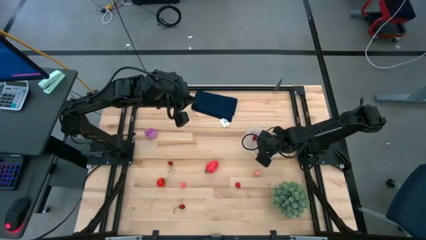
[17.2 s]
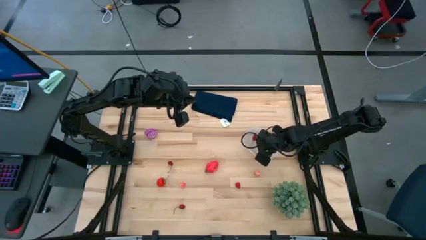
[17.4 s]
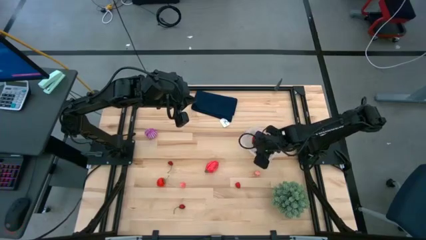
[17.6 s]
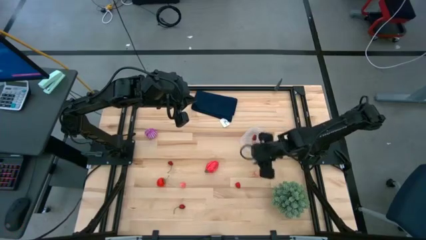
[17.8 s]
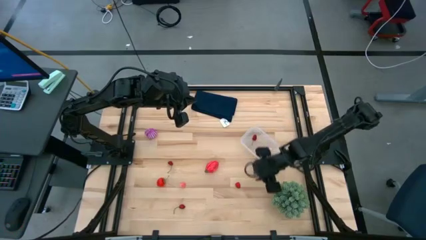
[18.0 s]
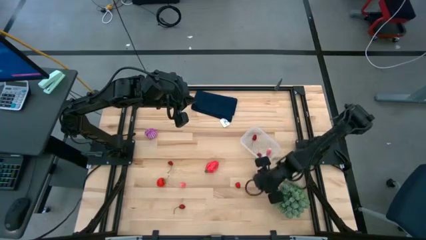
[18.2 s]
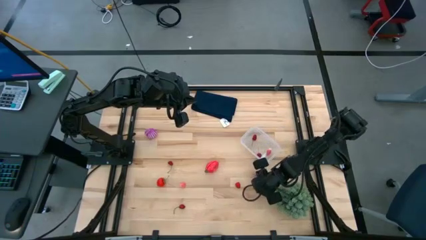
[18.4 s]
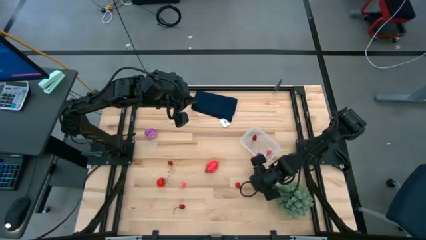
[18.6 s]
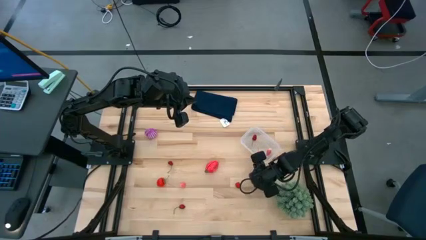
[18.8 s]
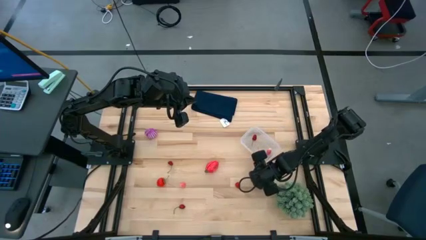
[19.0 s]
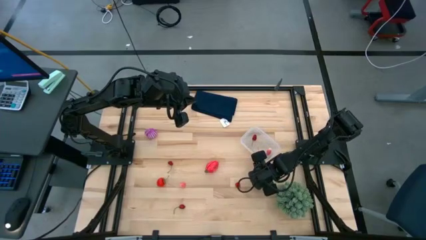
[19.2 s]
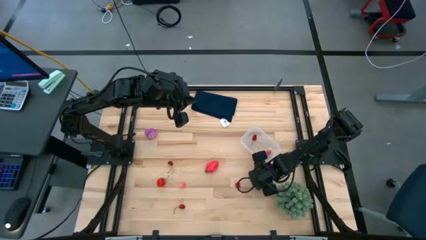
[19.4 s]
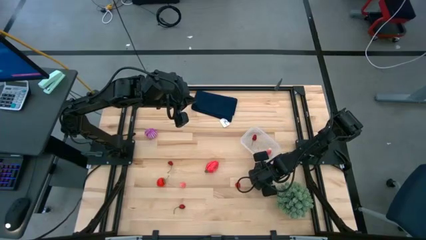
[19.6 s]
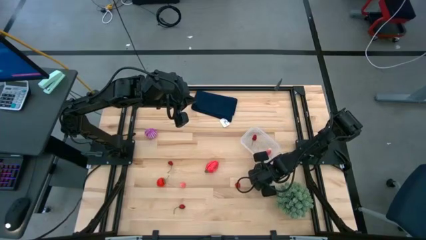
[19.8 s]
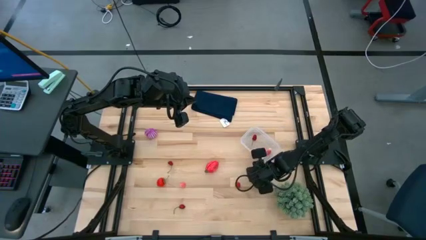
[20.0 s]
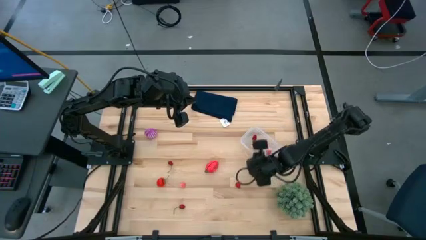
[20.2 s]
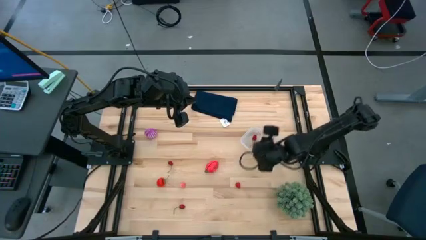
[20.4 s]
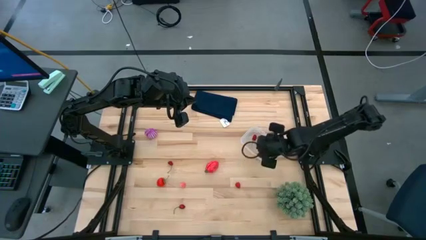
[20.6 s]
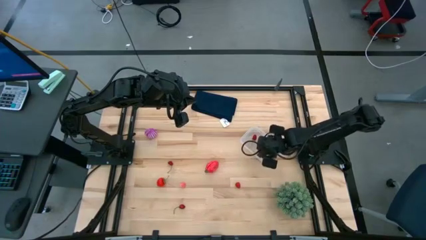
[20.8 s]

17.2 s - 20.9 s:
Task: Pick and placing Produce into tupperware
Put the peach into the transparent bin

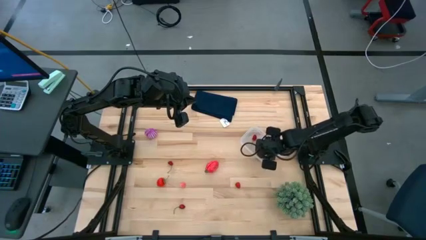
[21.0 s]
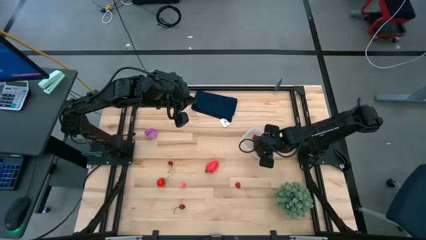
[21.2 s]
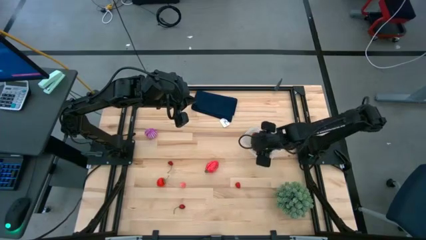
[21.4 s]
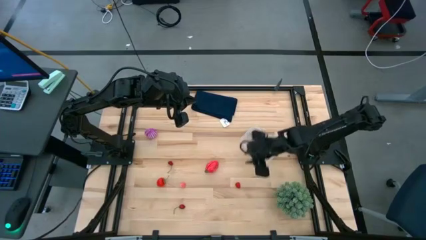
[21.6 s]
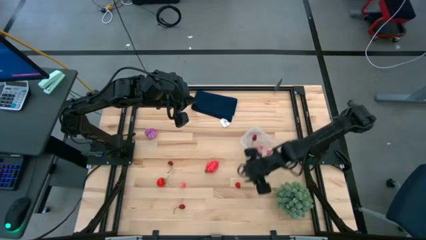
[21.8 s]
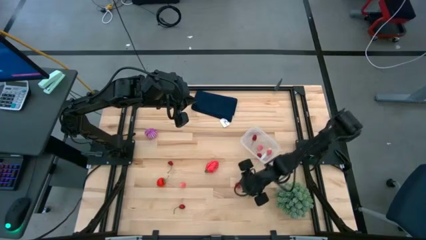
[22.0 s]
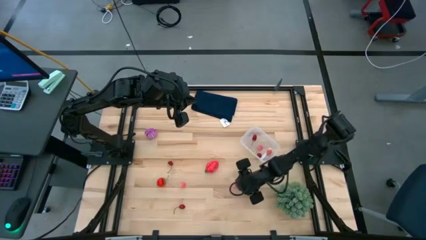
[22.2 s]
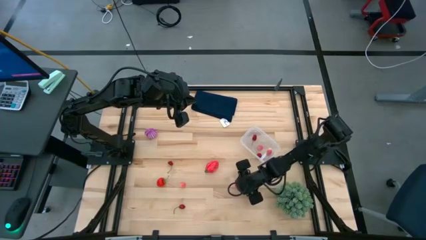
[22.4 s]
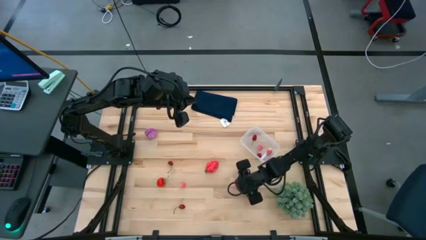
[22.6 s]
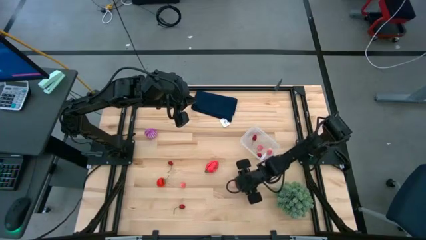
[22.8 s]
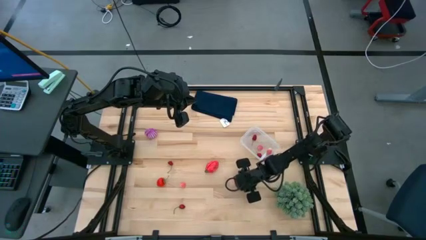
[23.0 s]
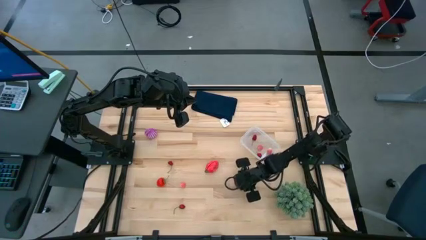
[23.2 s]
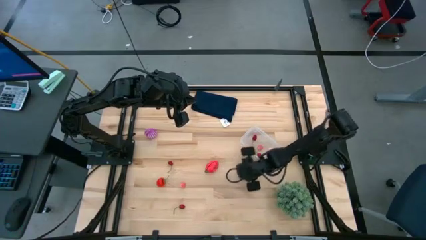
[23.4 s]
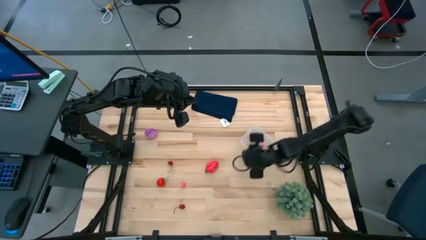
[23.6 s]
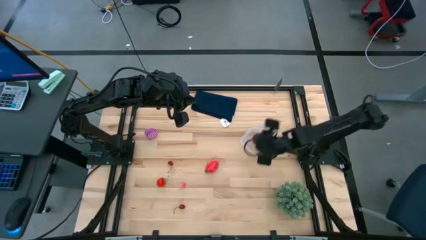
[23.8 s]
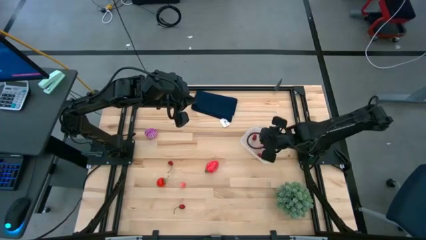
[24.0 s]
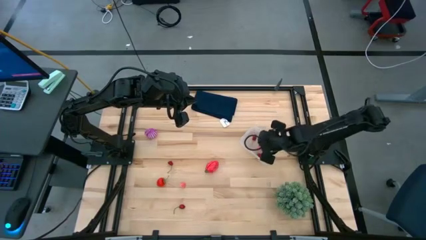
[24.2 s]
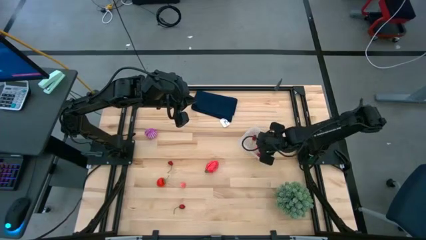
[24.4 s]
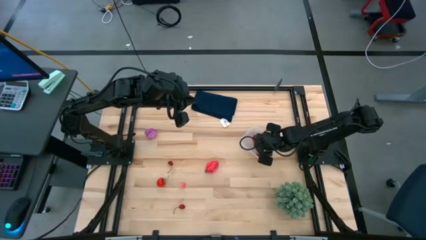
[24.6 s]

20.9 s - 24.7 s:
Put the raspberry into the transparent bin

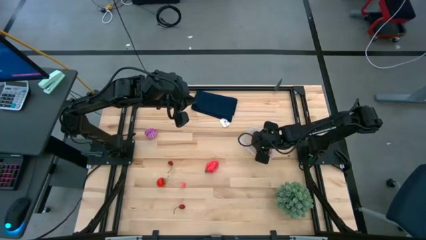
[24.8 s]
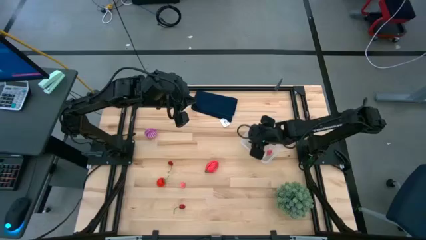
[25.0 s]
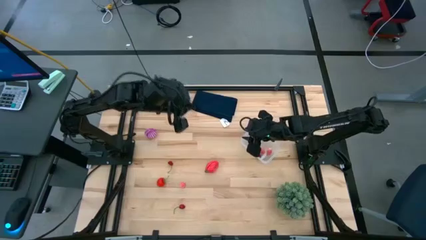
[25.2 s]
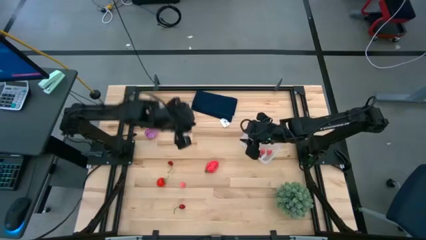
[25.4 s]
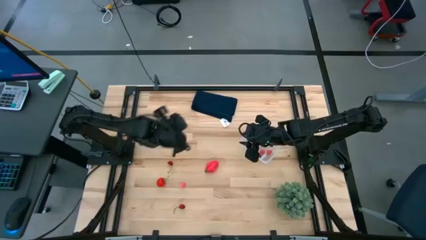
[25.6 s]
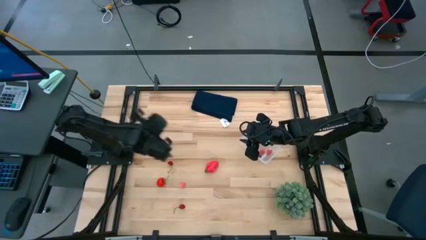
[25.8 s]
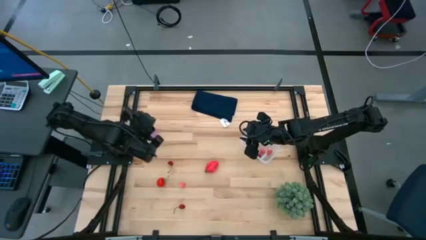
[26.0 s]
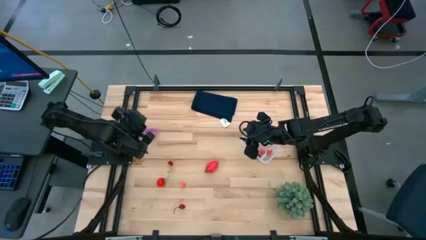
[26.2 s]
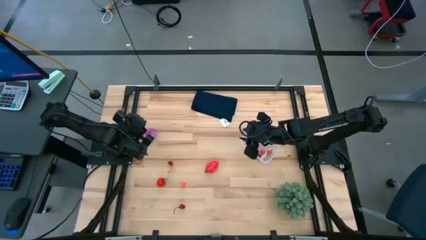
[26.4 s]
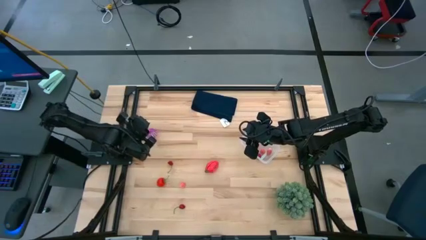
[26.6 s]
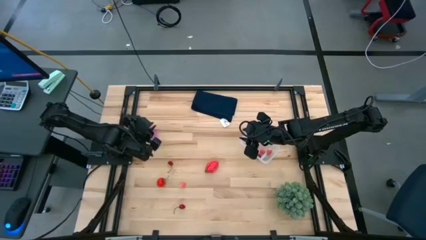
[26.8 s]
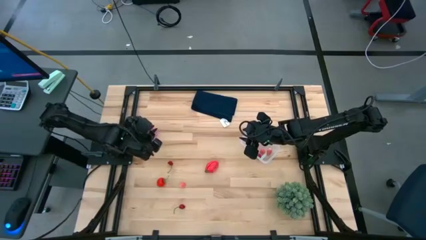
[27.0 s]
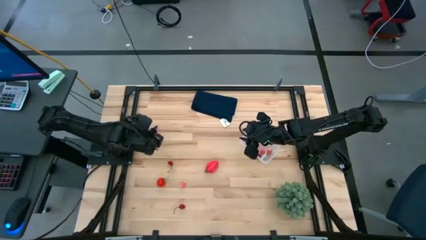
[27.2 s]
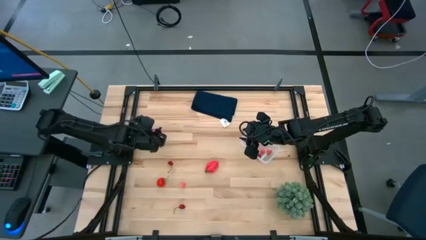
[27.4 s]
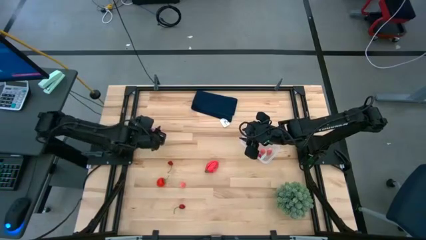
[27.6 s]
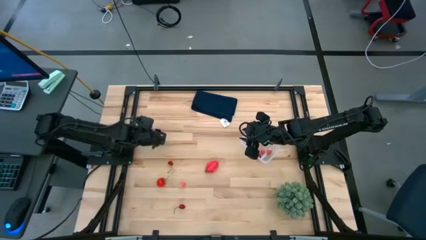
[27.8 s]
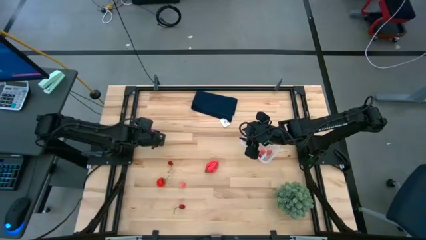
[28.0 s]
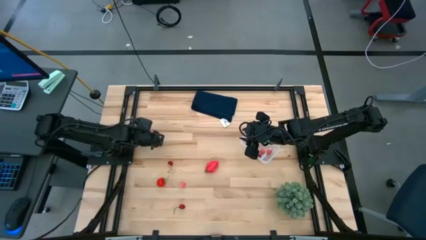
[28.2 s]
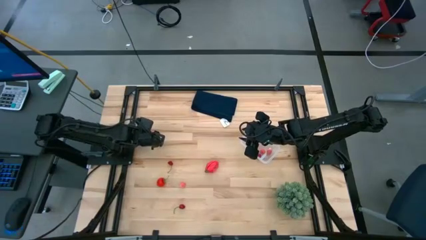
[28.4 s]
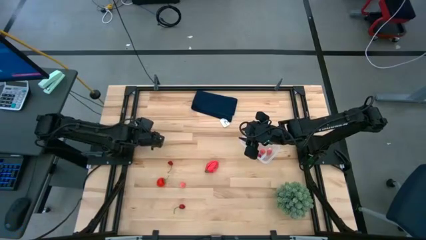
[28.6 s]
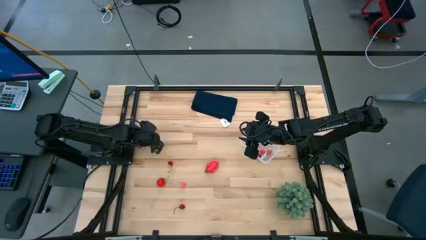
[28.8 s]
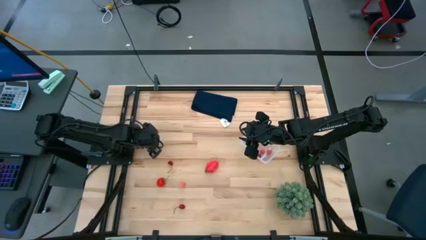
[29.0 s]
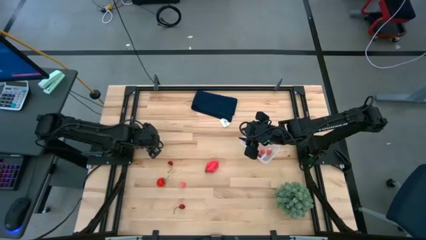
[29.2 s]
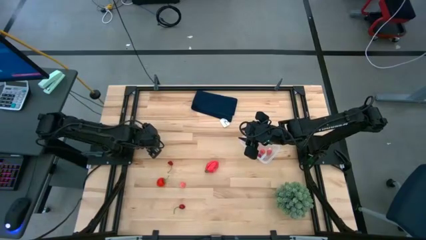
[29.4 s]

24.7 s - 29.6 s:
Put the onion into the transparent bin

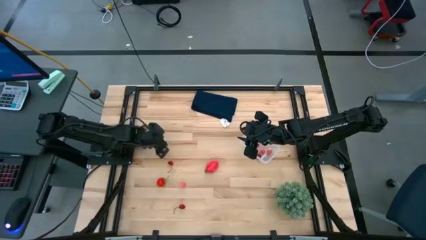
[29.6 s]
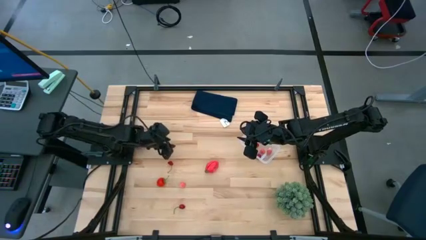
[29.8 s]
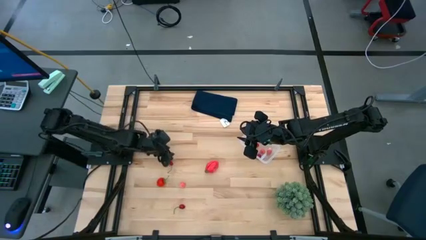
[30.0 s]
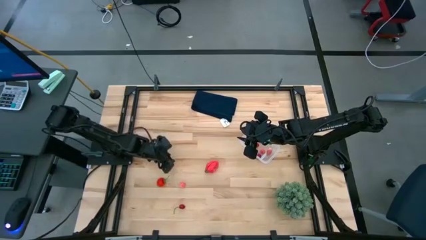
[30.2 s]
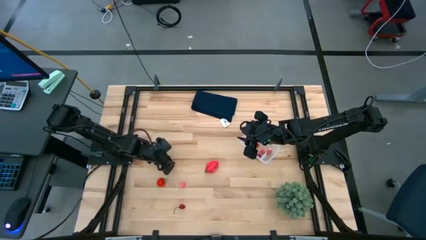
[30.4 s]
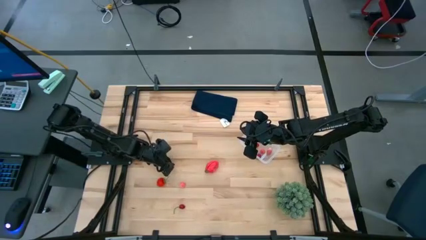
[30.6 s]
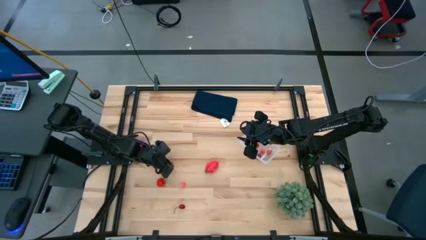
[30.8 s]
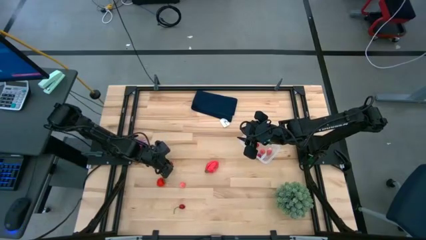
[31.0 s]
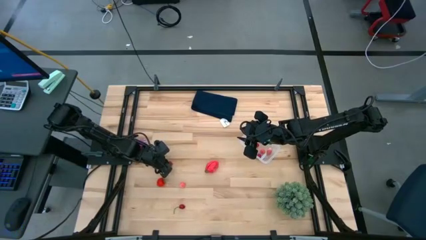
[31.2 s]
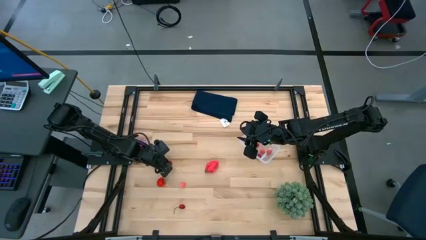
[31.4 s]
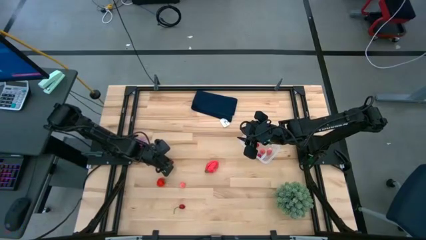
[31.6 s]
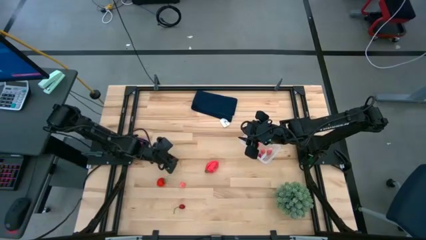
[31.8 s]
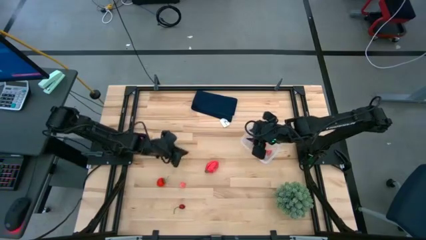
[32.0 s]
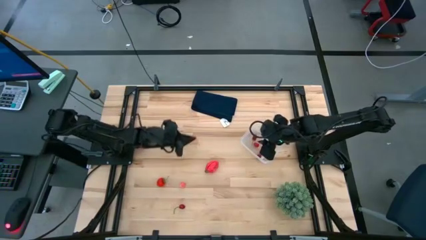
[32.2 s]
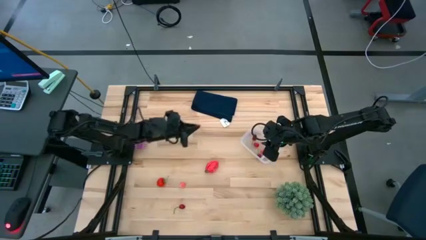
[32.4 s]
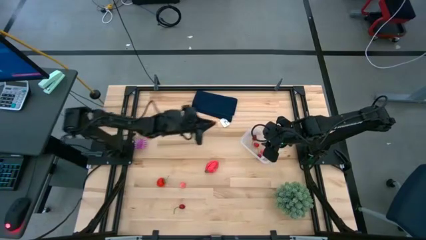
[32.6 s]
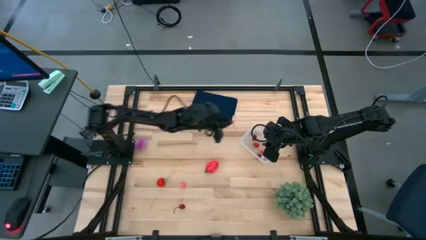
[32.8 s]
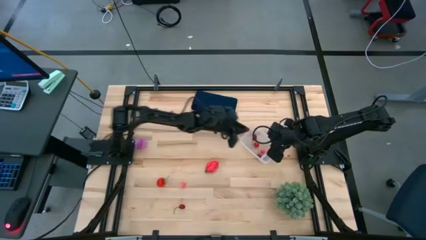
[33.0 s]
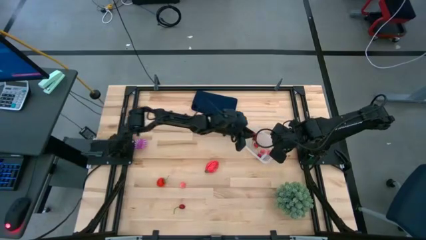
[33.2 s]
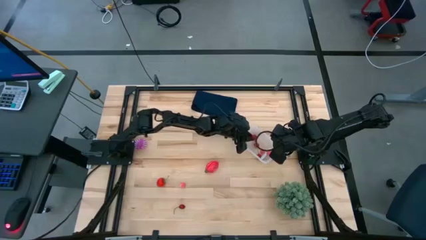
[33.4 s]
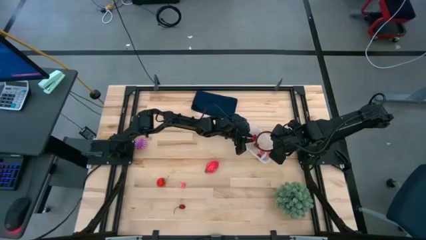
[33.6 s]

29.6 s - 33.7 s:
Put the cherry into the transparent bin

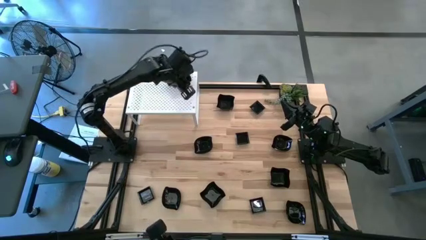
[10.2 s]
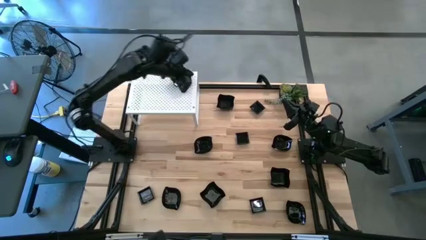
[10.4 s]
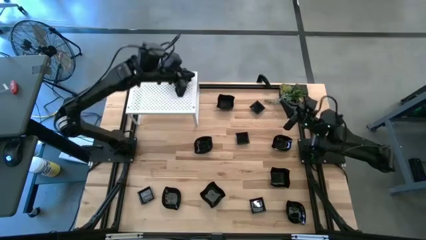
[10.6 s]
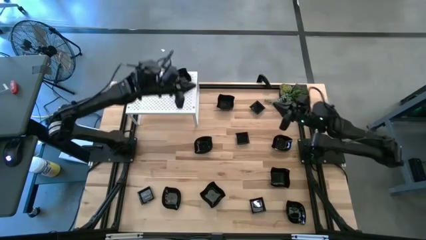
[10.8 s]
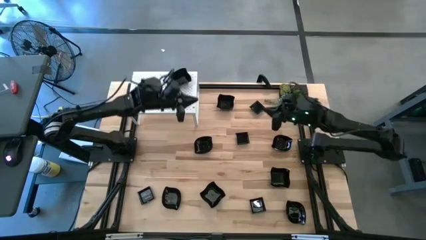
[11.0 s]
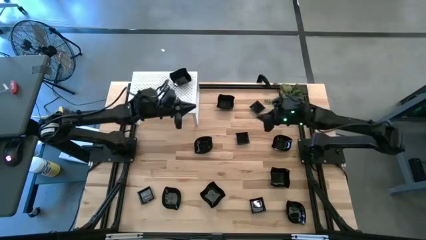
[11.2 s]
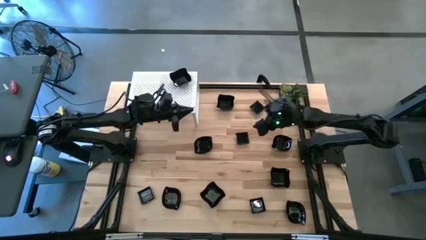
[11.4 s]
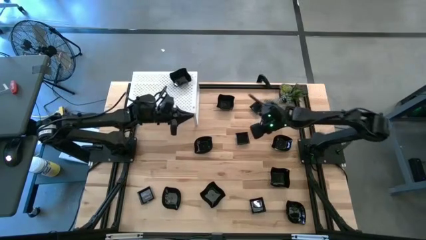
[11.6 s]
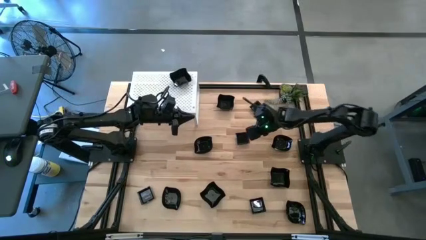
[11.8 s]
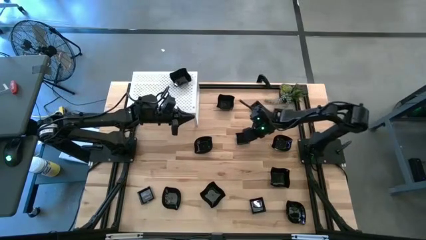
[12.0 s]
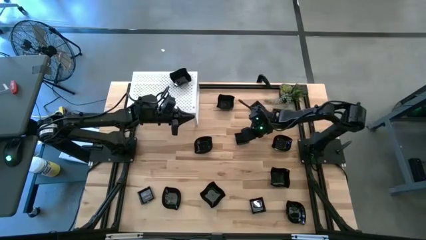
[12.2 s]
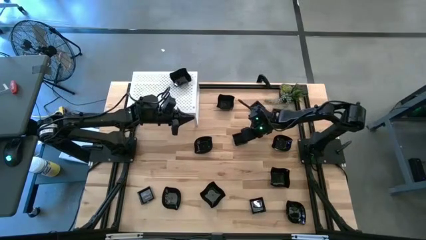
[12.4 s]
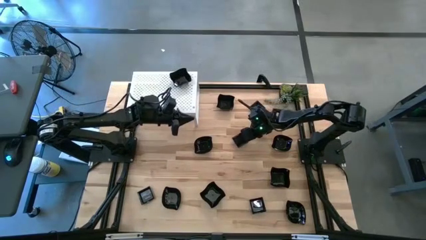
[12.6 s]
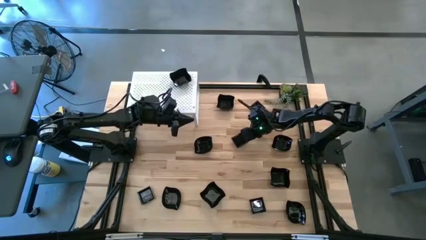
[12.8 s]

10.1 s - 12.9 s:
Task: Pick & Place Mini shaped plates
Put the black square plate on the shelf
